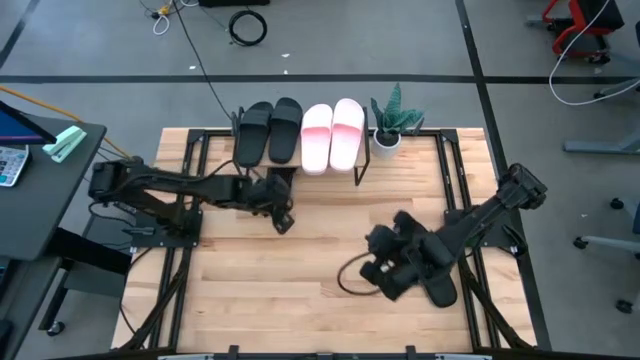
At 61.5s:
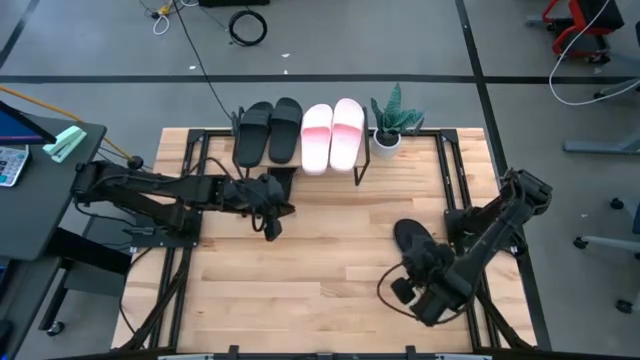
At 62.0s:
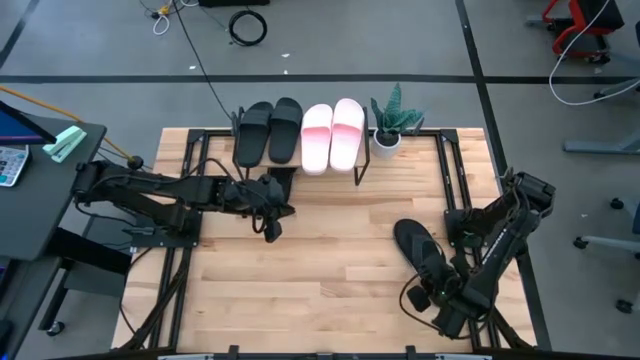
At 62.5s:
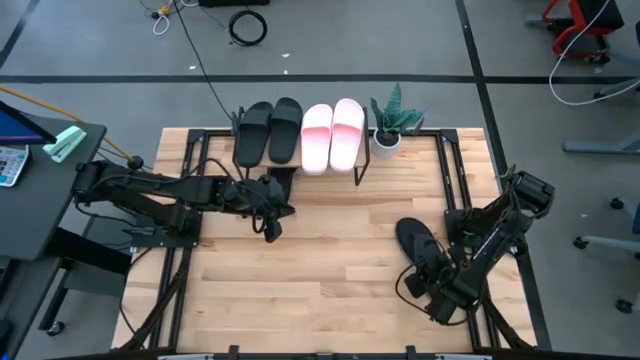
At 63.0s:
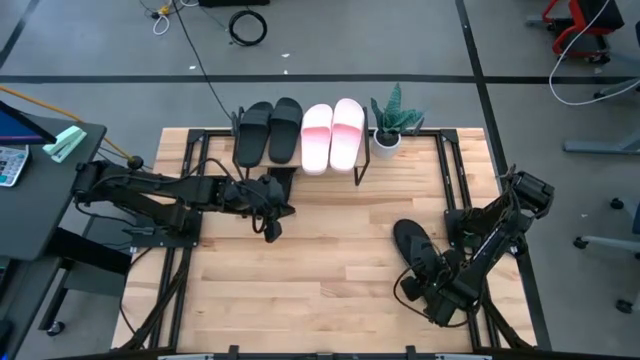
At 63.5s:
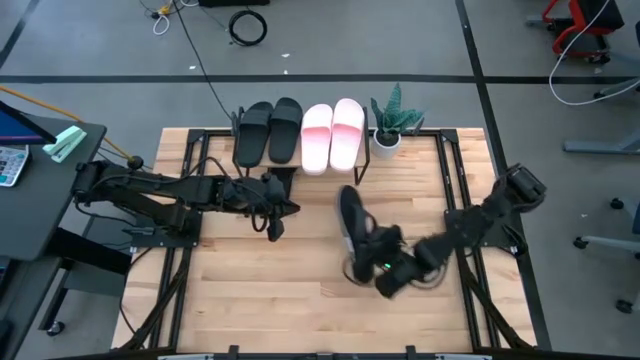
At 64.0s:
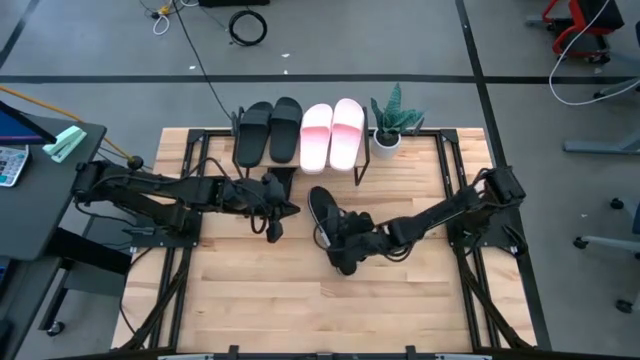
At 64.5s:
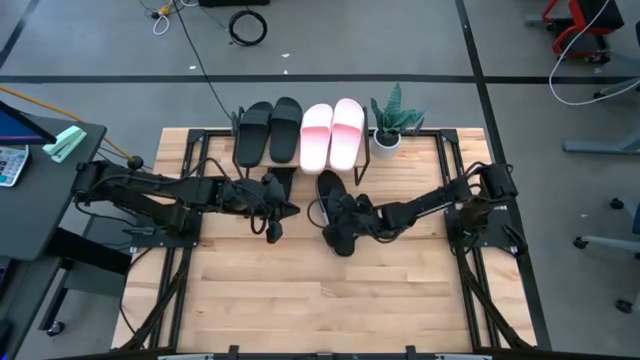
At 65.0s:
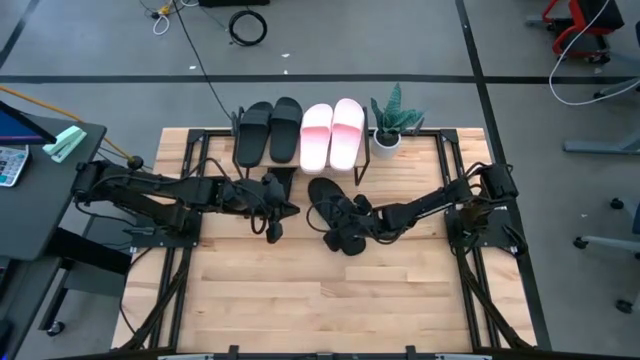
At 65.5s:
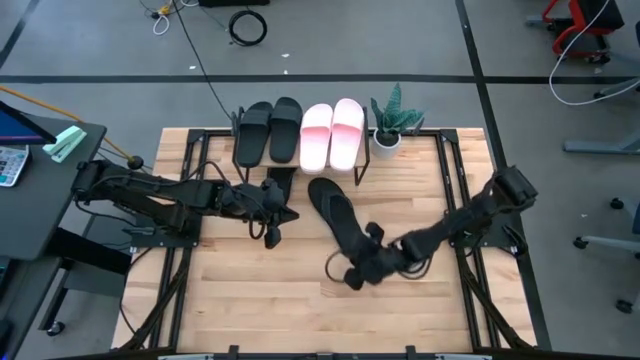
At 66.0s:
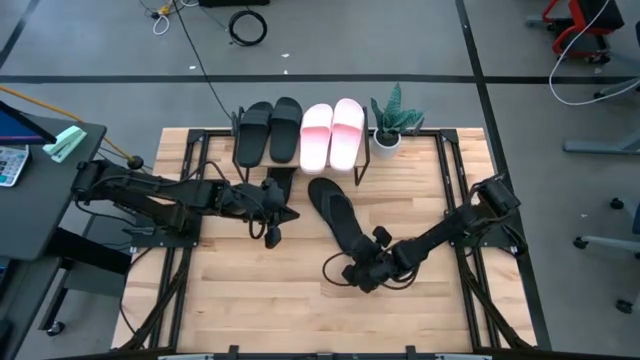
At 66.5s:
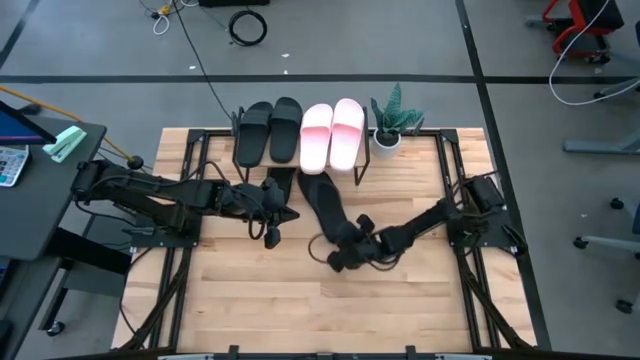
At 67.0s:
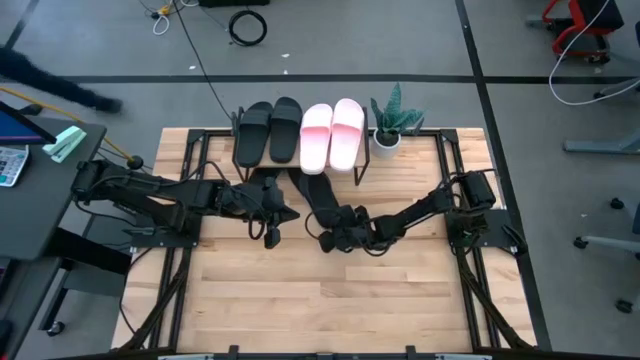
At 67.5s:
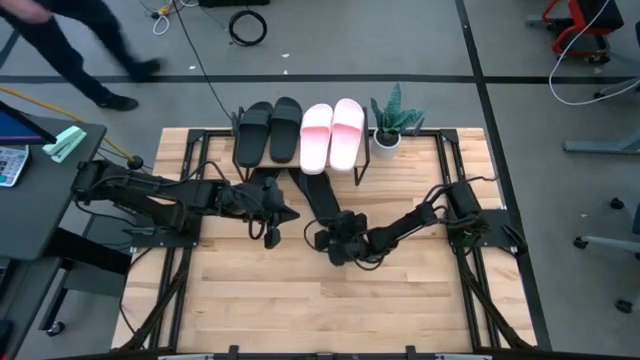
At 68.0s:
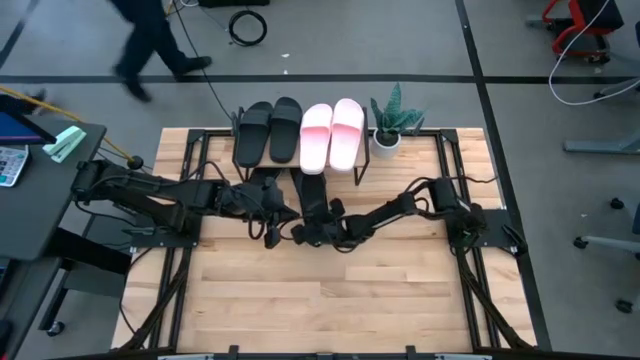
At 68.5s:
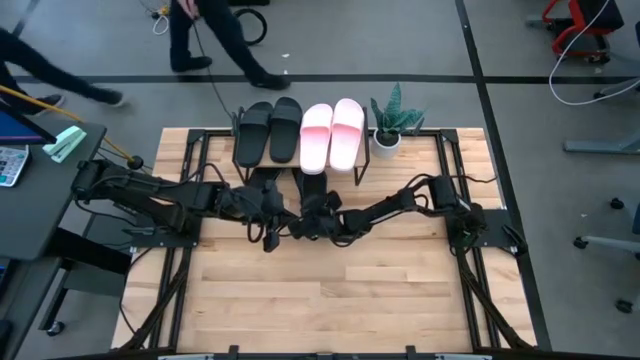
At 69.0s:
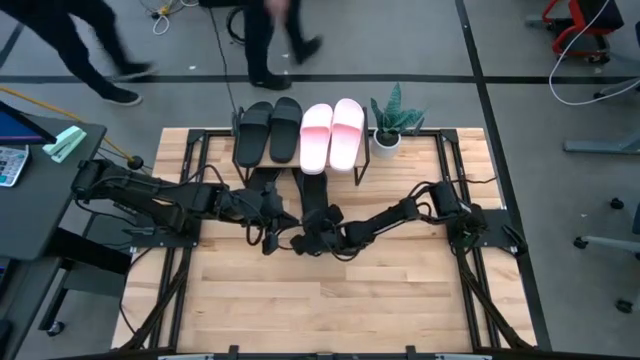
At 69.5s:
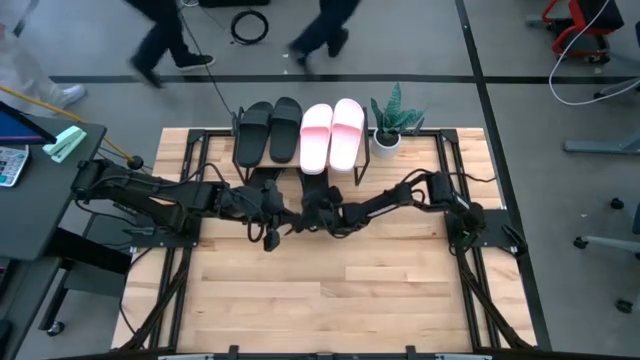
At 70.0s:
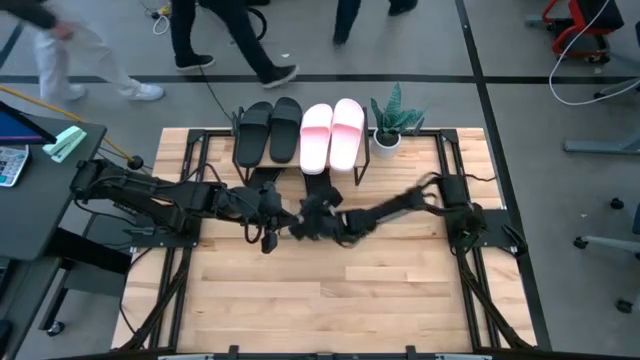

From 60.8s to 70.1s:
Task: Pick and place slides into the shelf
Put the black slipper under the shelf

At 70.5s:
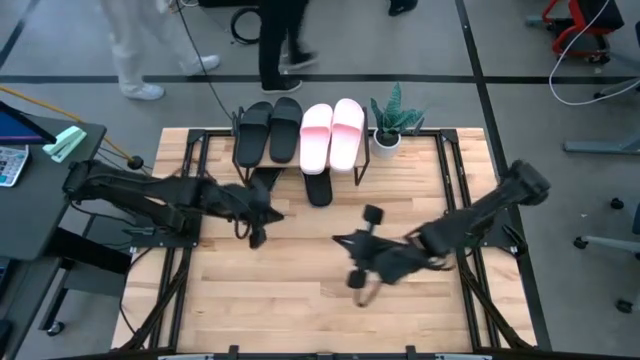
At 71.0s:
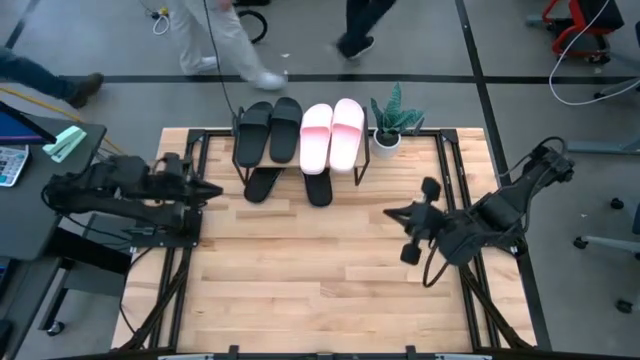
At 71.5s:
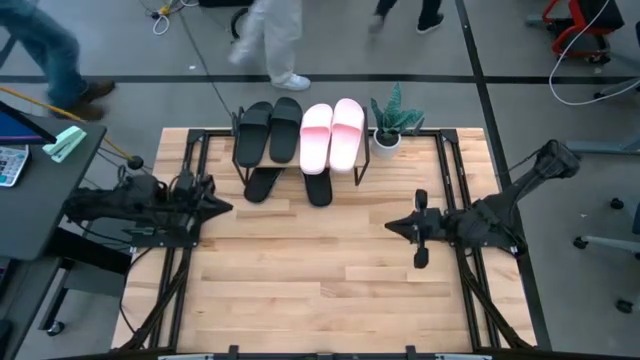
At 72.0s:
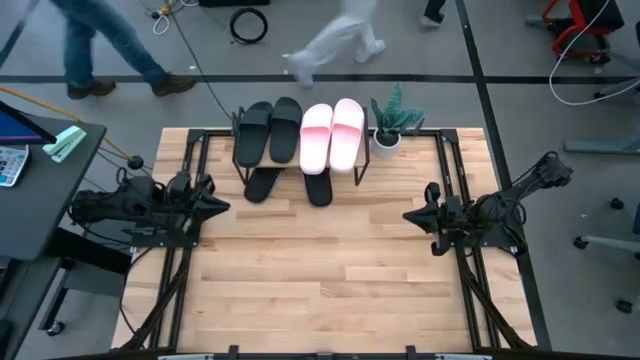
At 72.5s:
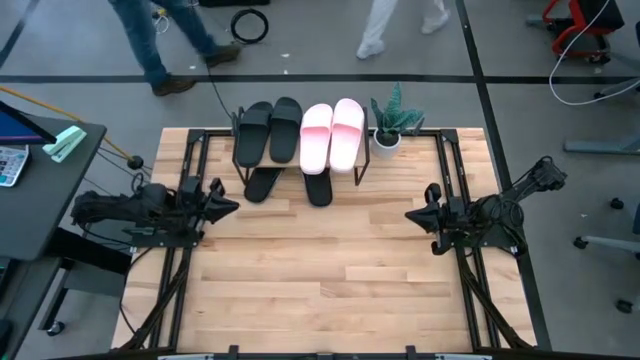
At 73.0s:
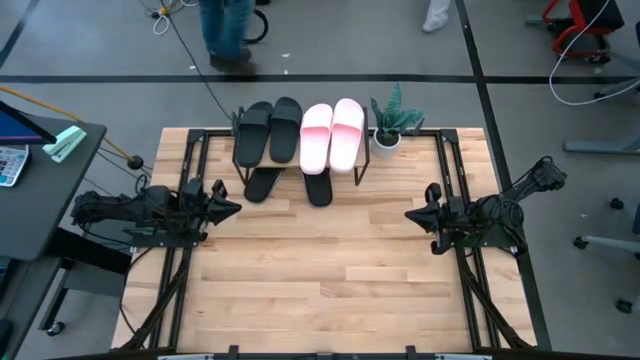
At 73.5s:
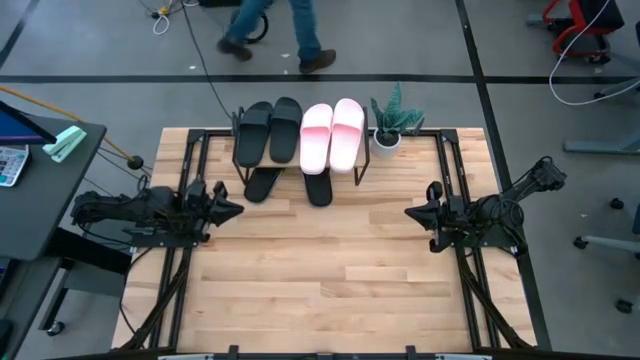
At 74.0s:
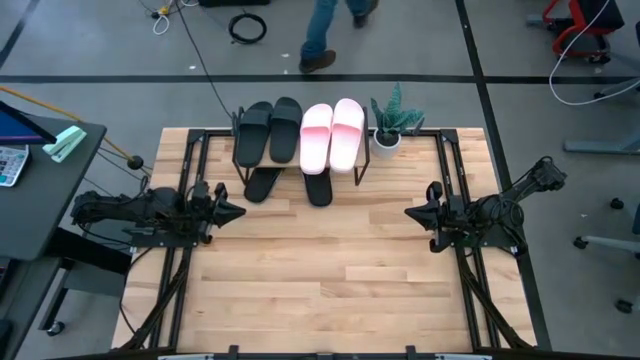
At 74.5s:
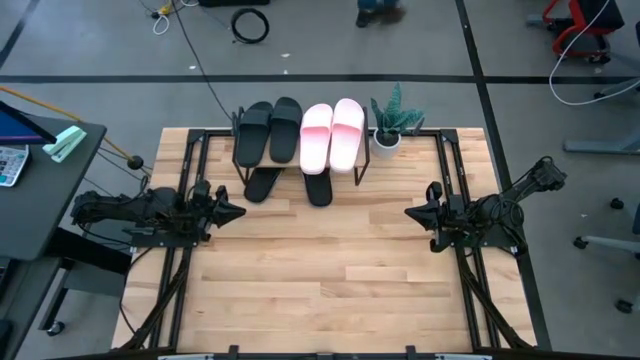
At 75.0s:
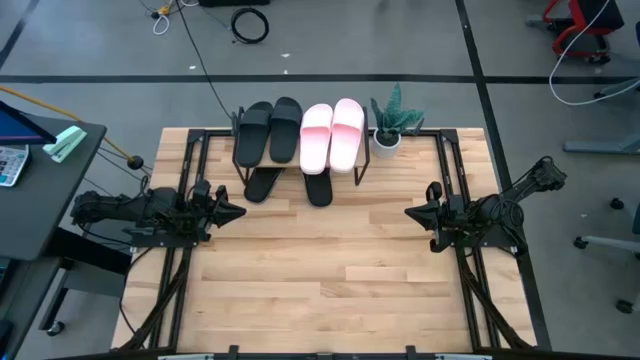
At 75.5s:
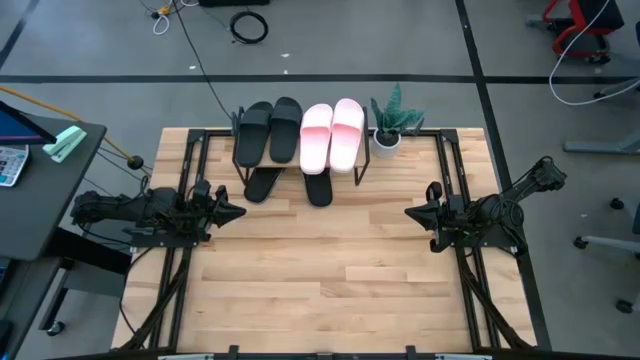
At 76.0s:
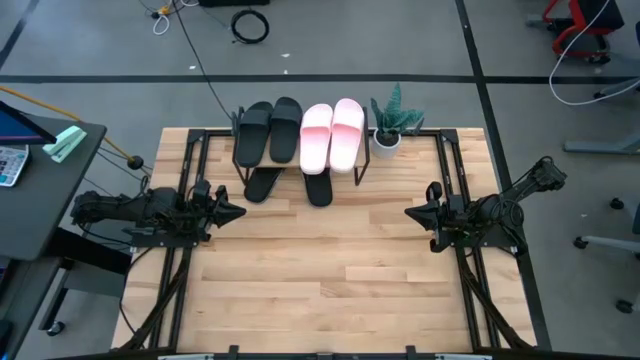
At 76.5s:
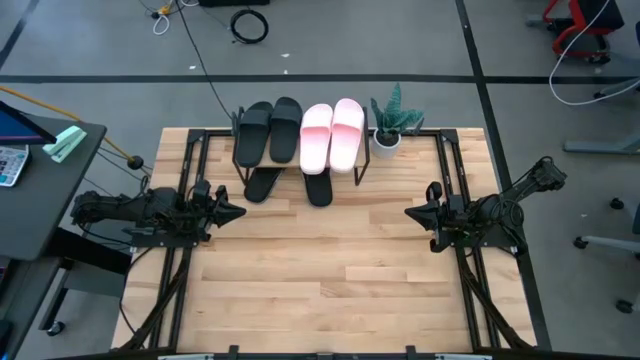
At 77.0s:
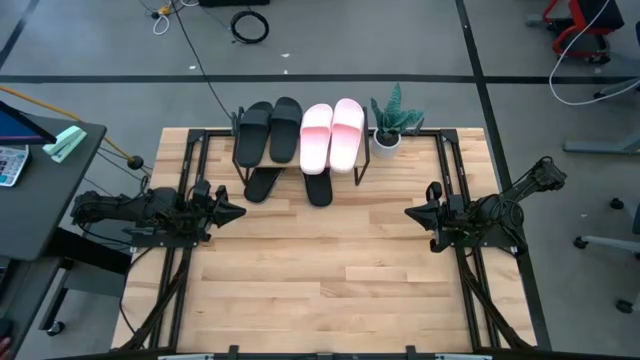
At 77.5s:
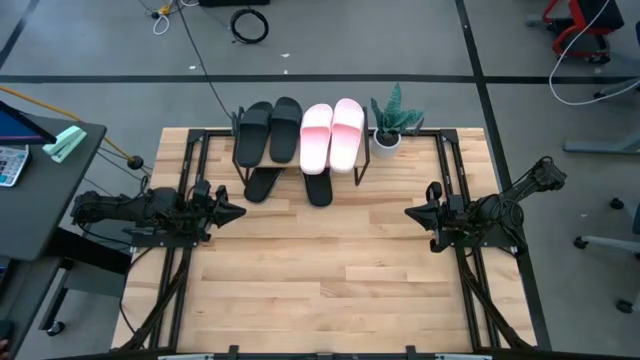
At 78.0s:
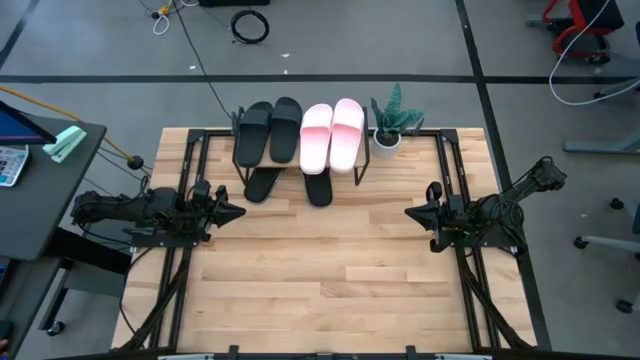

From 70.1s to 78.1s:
Return to Home Position

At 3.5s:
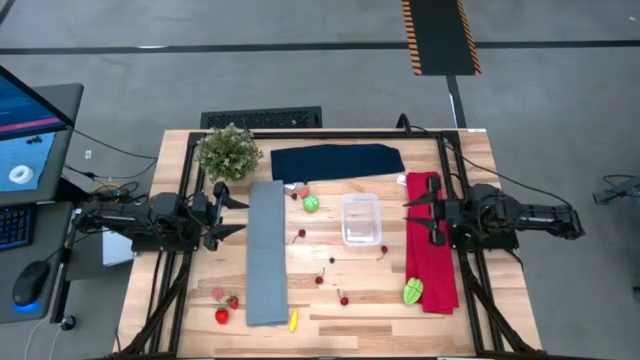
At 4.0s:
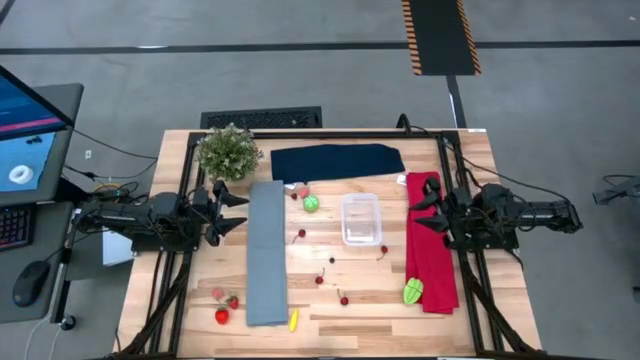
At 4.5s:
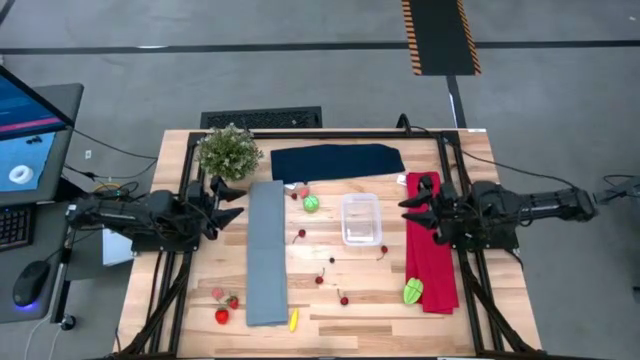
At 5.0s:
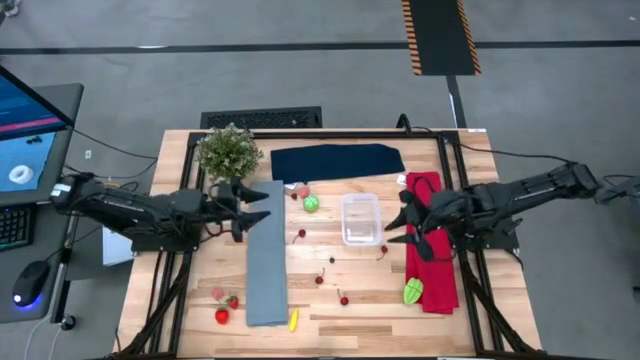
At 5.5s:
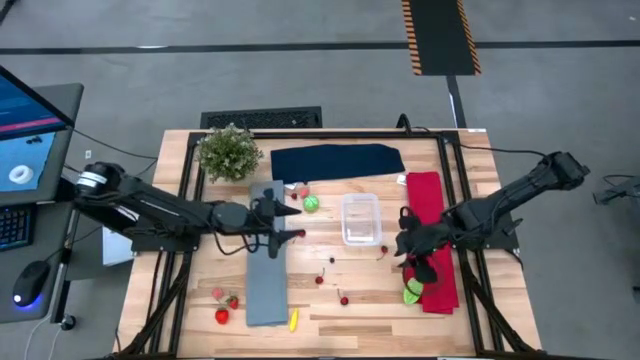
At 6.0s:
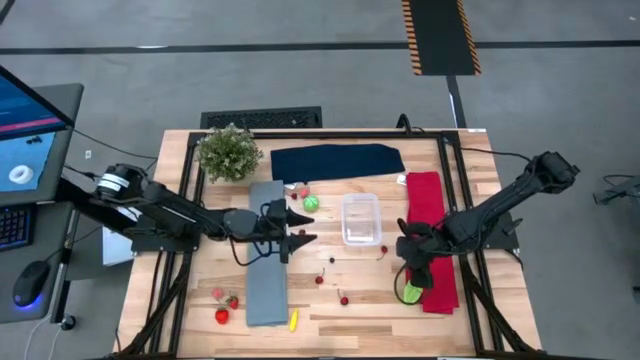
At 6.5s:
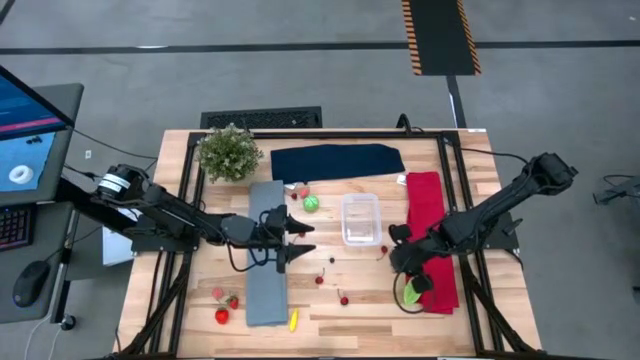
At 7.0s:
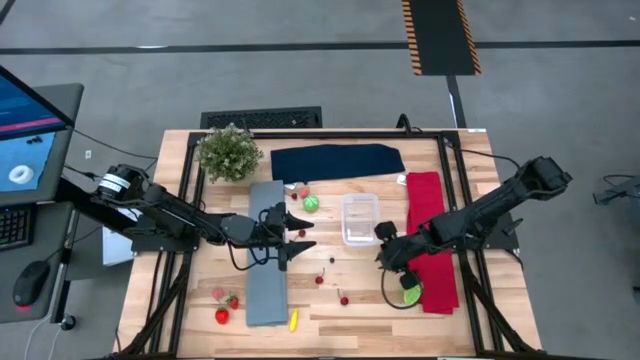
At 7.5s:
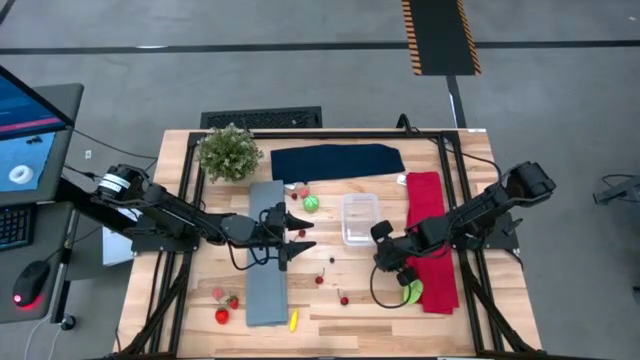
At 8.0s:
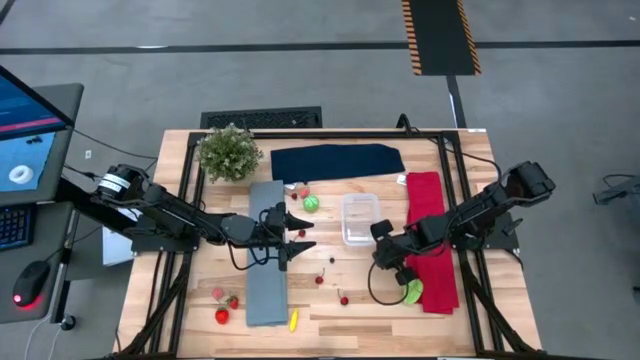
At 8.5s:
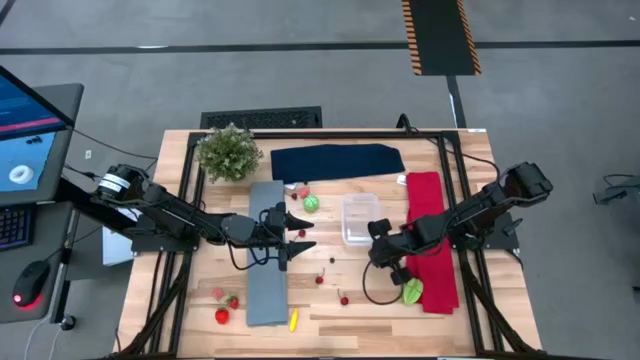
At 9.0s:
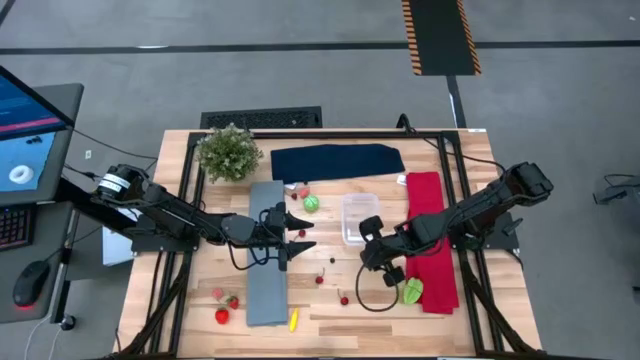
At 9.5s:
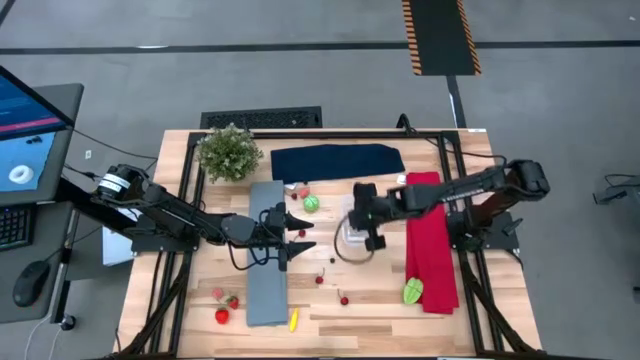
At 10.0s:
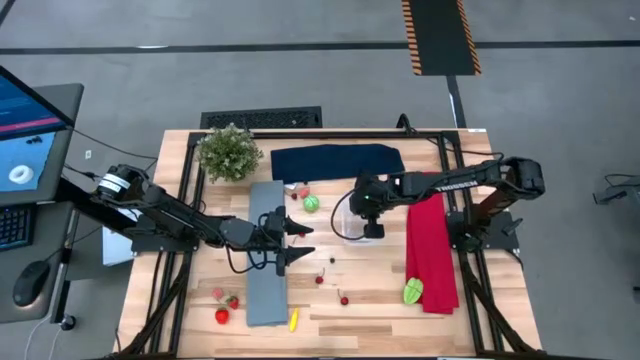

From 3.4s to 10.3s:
Task: Pick and placing Produce into tupperware
Put the red cherry into the transparent bin
